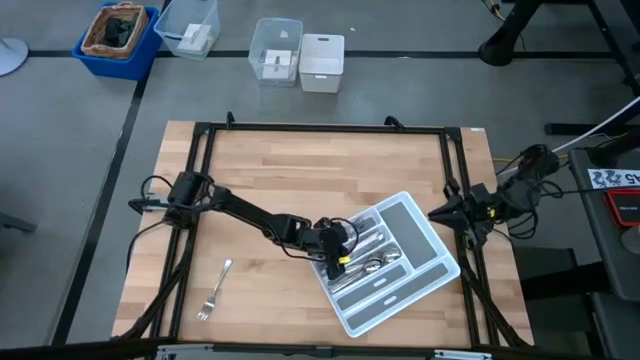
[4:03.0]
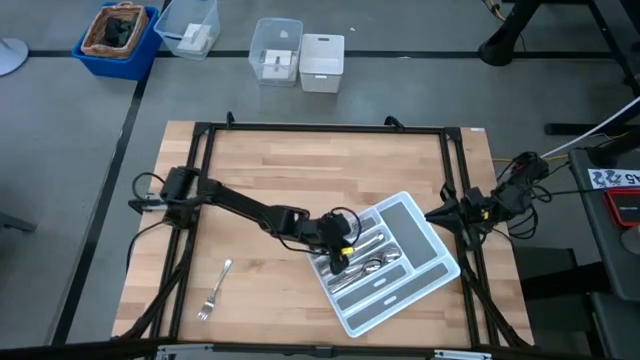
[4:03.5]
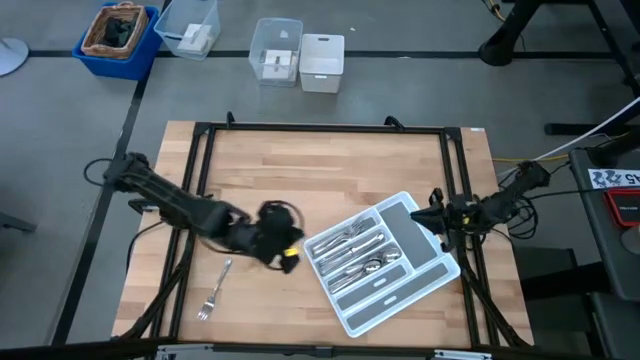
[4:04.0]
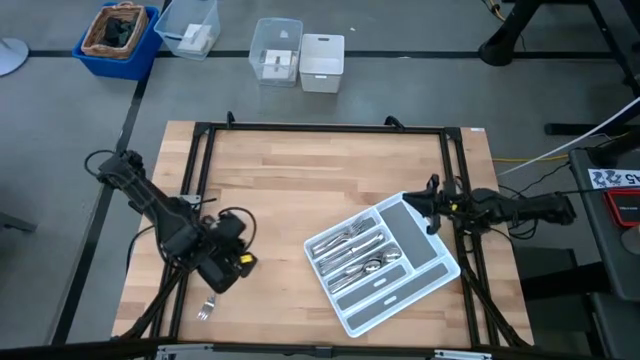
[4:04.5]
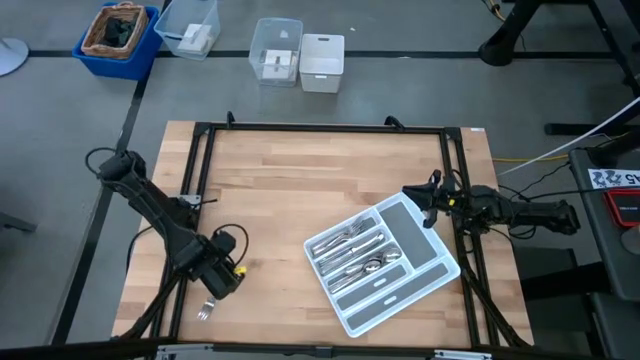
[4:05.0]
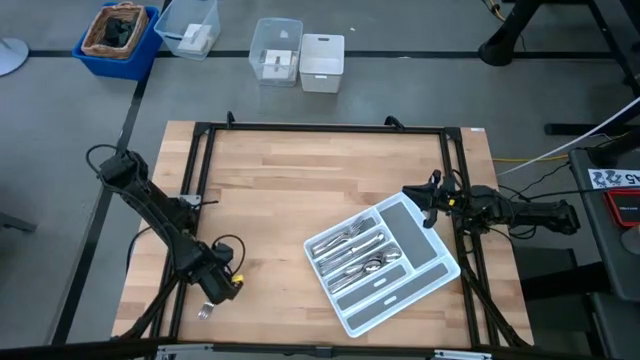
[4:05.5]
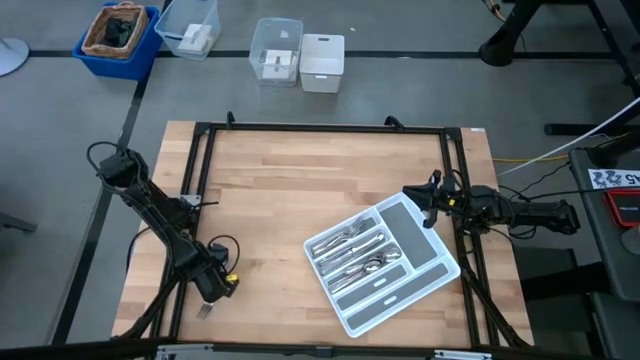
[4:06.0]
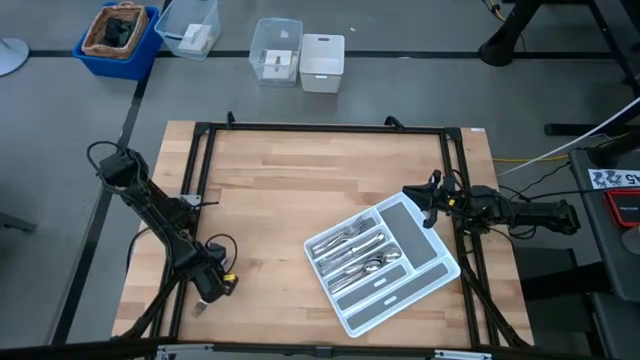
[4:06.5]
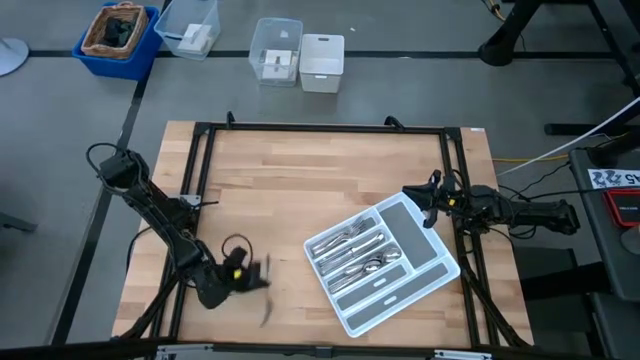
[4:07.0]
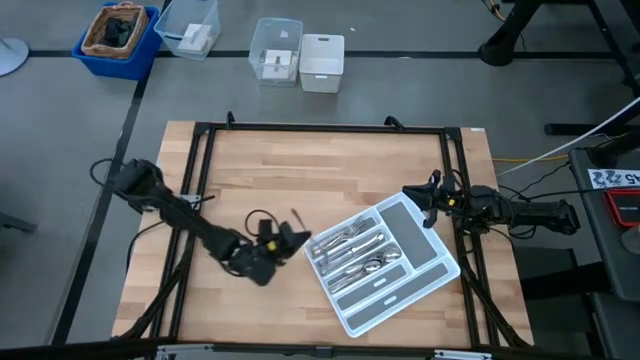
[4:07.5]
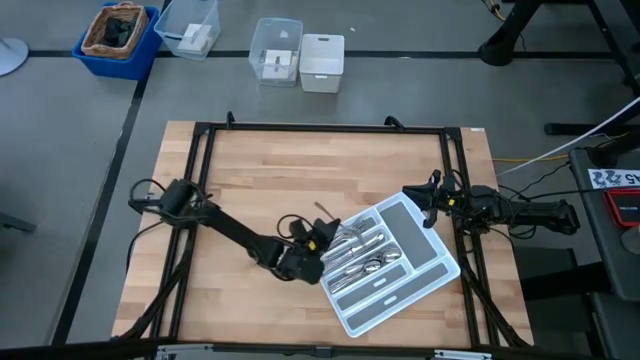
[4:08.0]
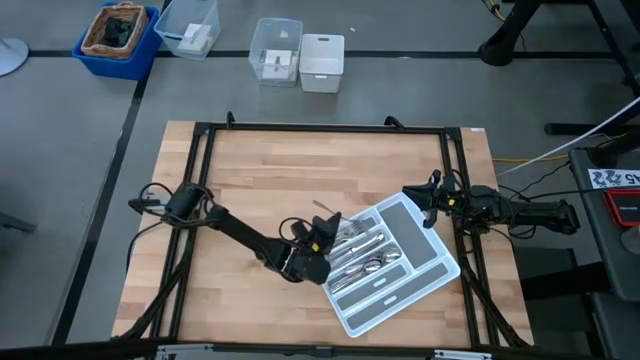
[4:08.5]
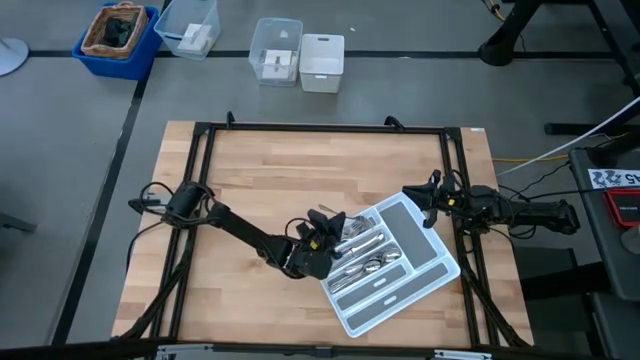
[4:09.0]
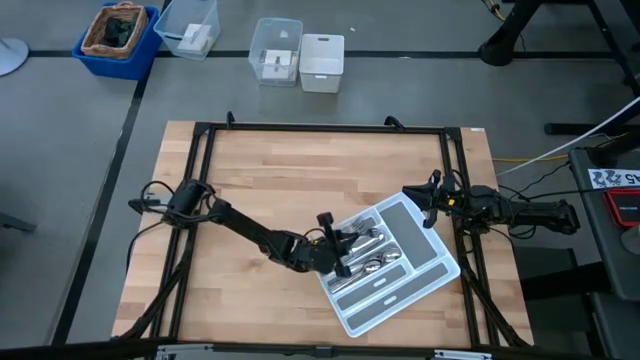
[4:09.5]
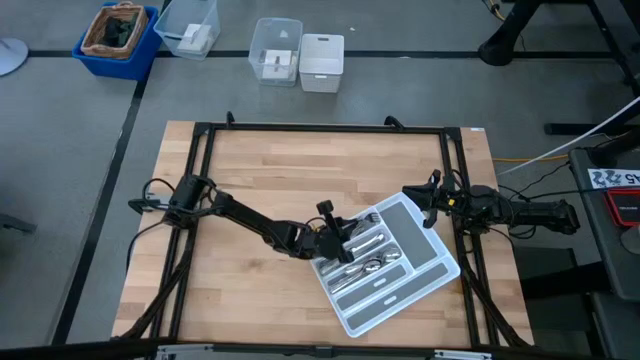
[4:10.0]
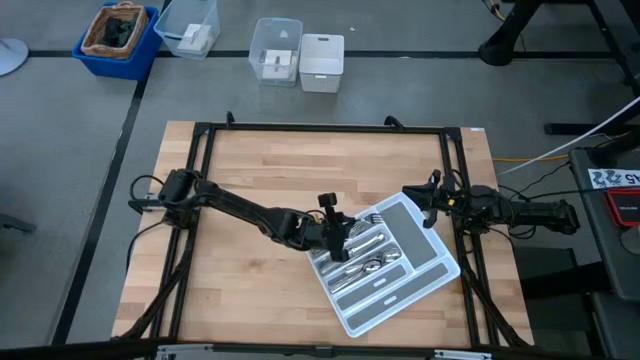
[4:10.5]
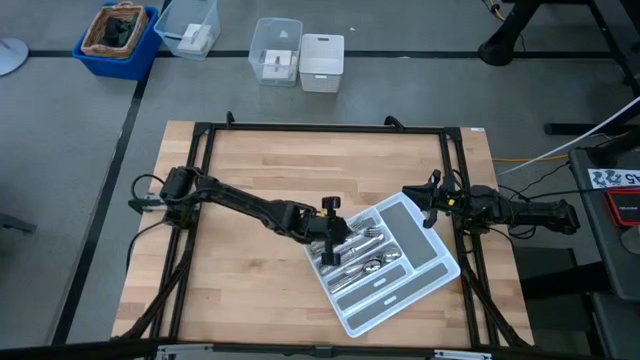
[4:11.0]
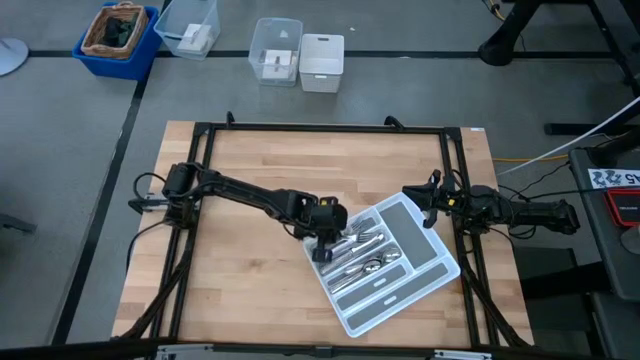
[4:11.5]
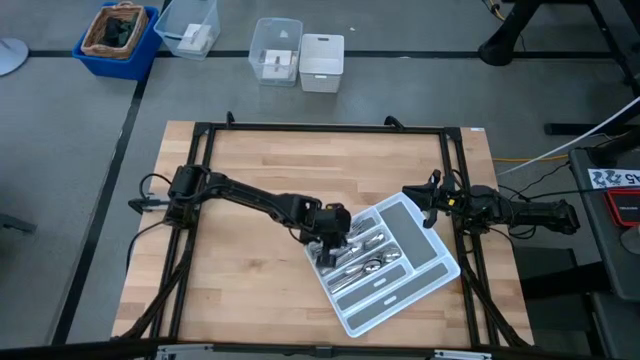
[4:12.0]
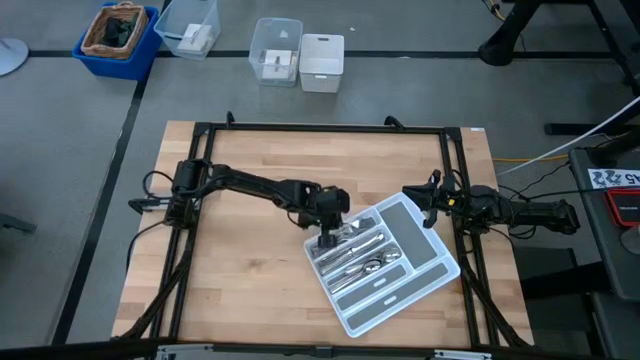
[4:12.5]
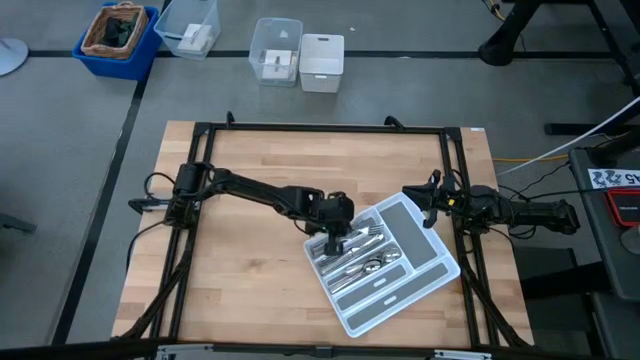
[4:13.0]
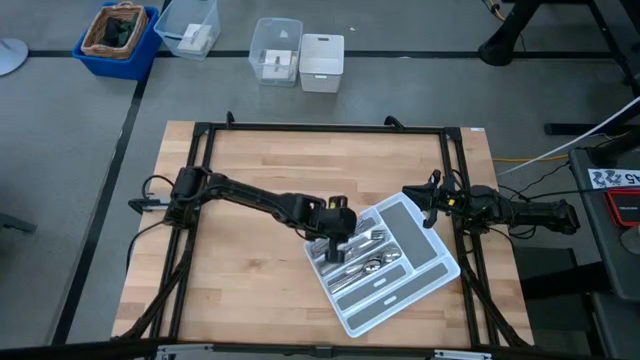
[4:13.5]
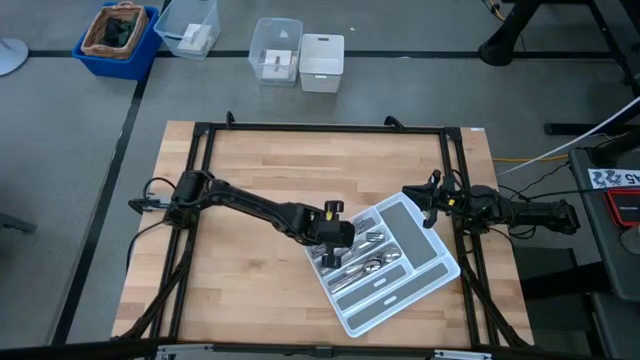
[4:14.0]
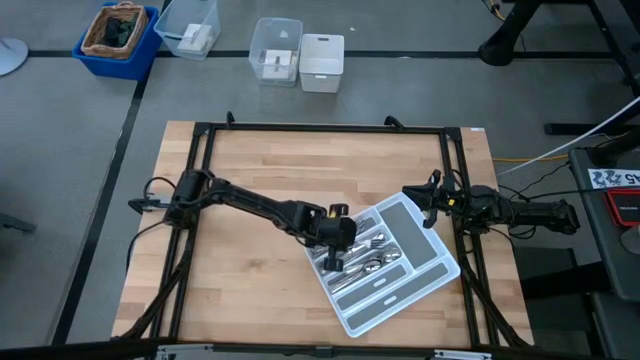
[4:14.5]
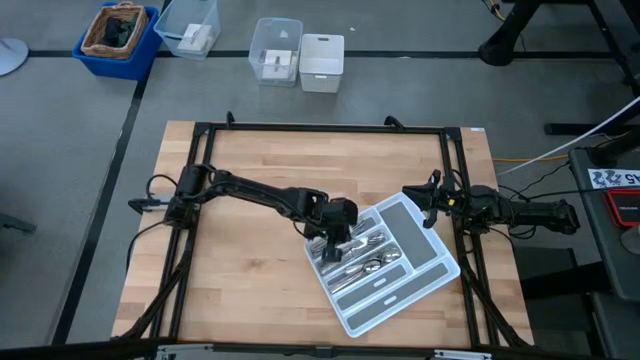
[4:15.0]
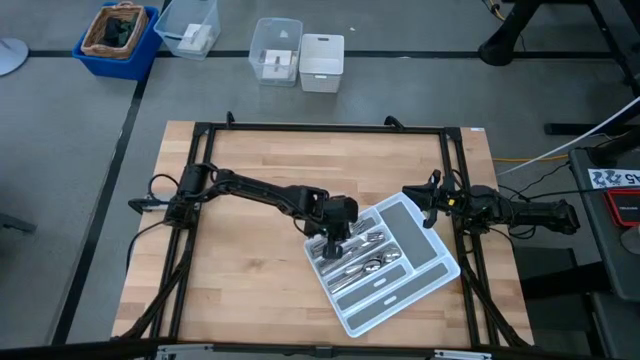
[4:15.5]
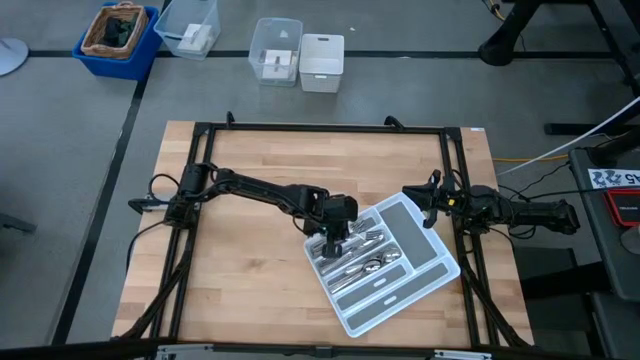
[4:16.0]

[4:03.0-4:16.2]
Task: Sort silverware
Put the silver fork into the silverware tray

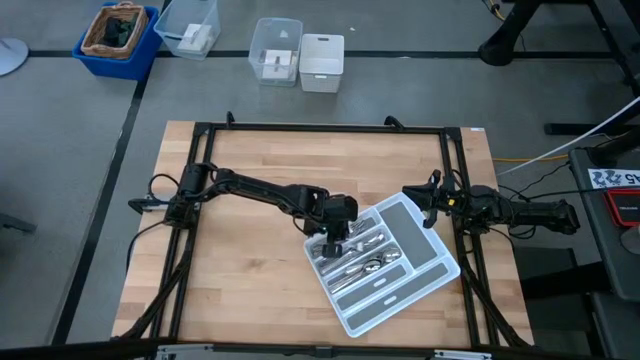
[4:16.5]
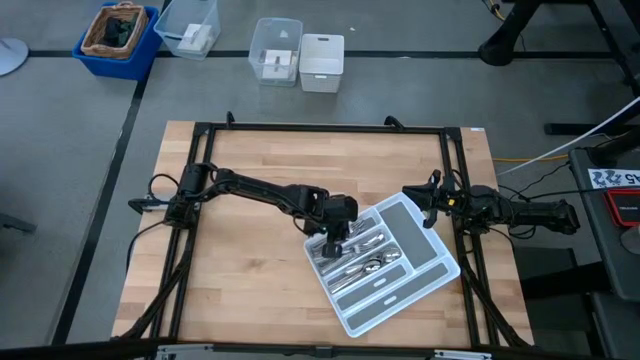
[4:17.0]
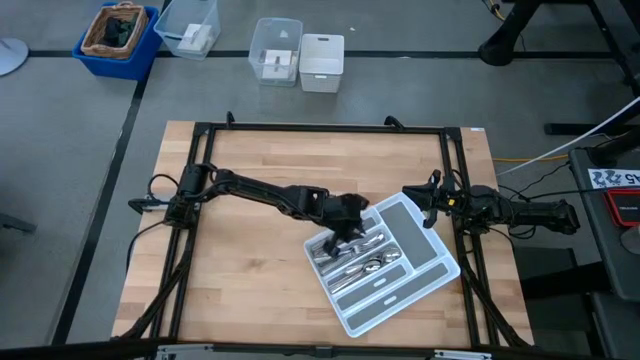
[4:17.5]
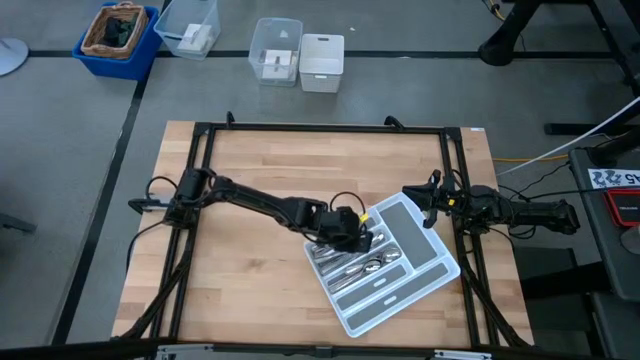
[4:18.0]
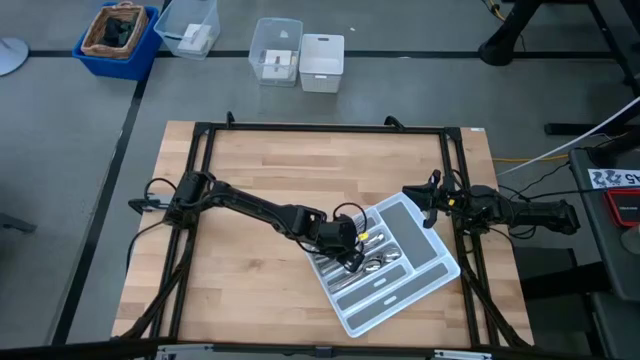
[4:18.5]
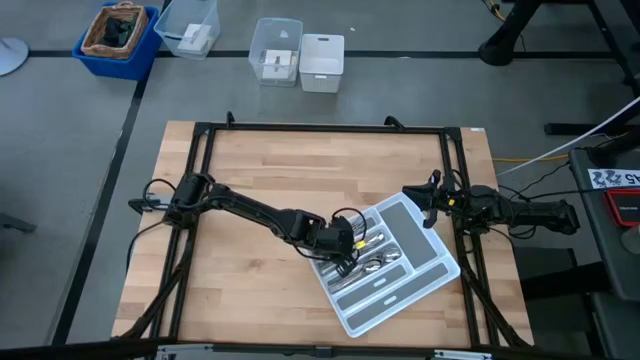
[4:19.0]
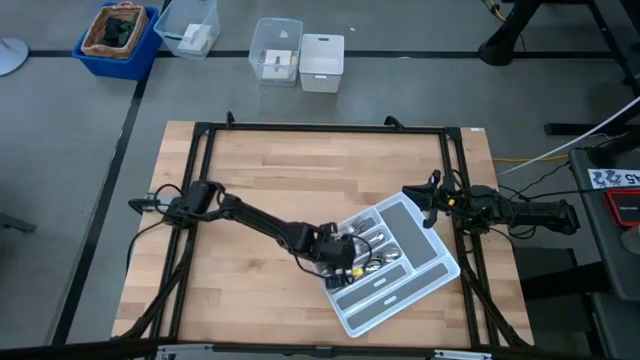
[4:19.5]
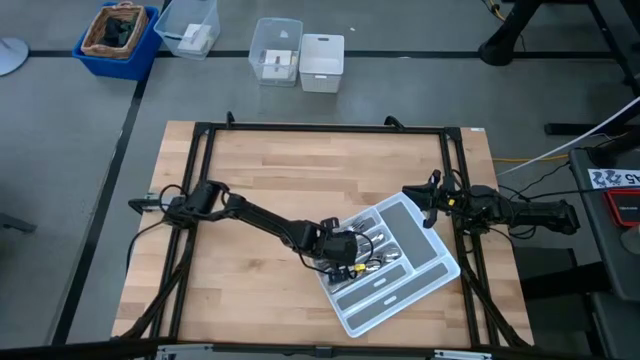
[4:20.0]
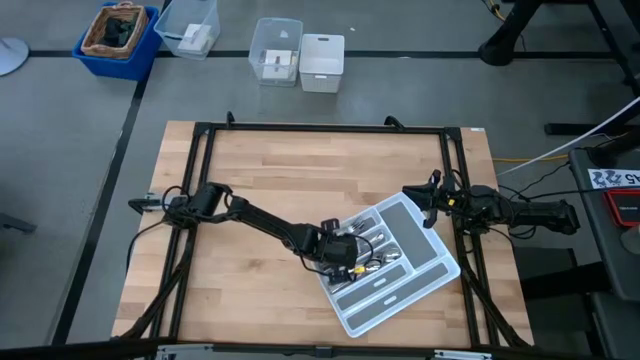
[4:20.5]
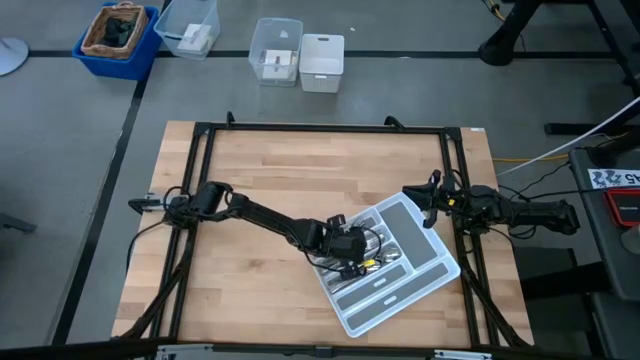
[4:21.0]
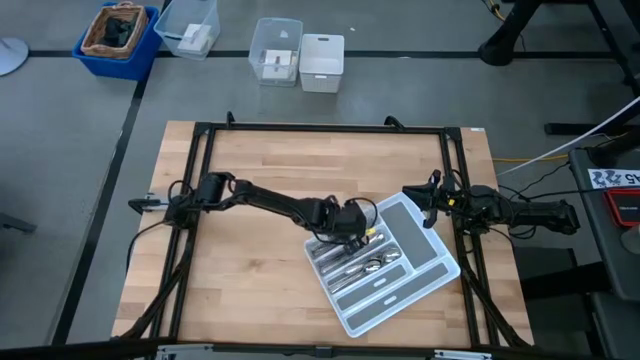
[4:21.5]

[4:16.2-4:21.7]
Put the silver fork into the silverware tray

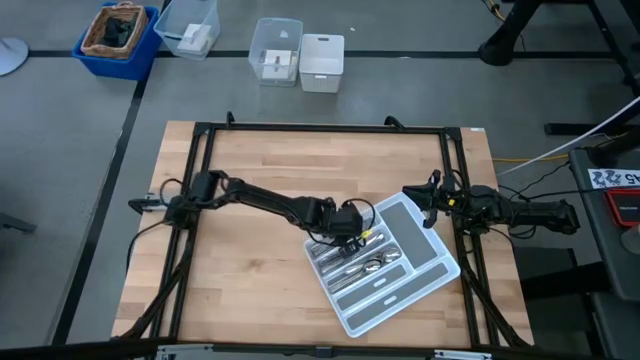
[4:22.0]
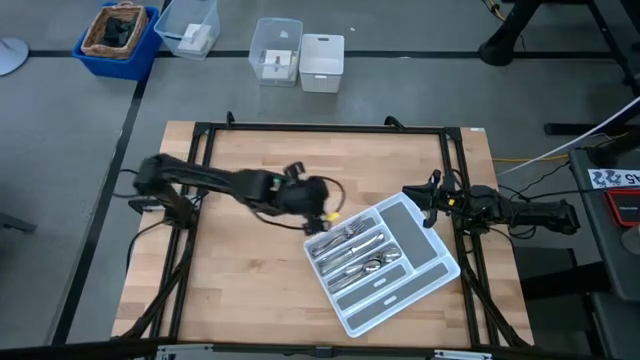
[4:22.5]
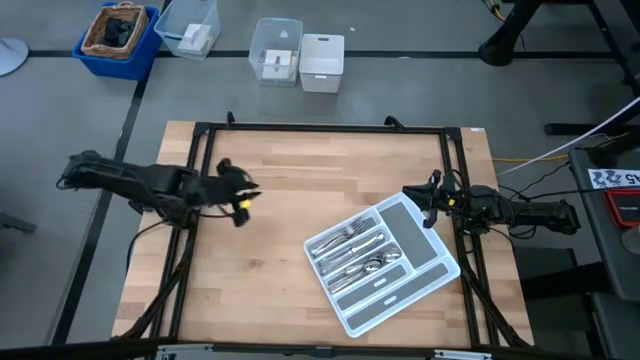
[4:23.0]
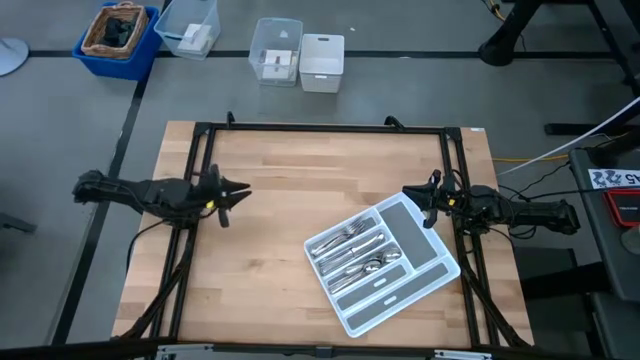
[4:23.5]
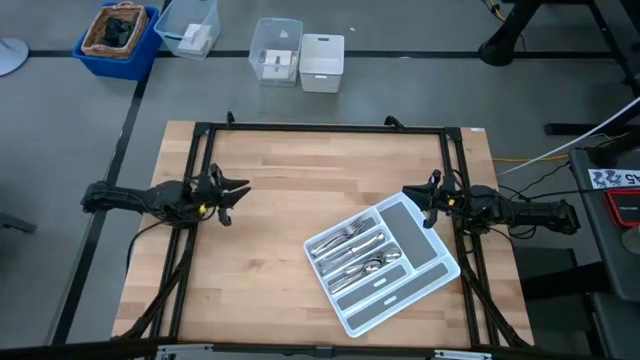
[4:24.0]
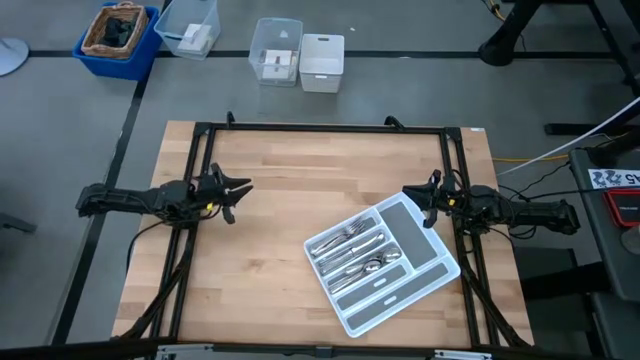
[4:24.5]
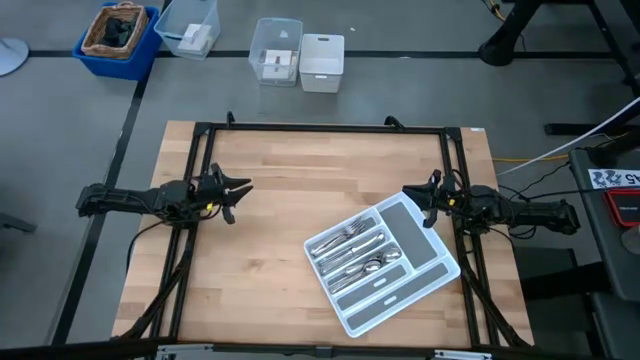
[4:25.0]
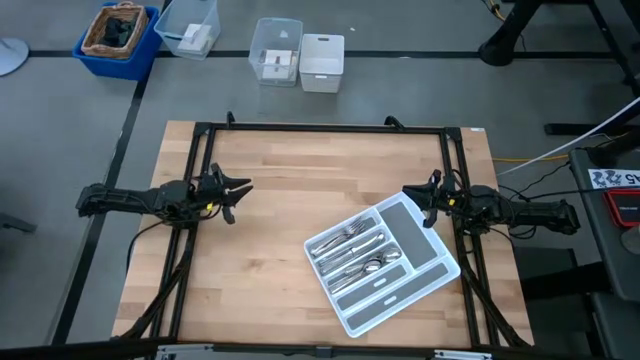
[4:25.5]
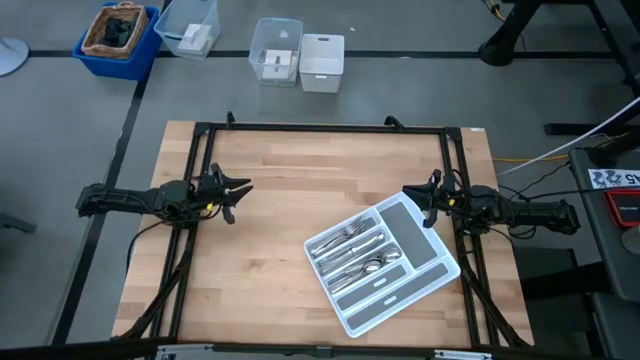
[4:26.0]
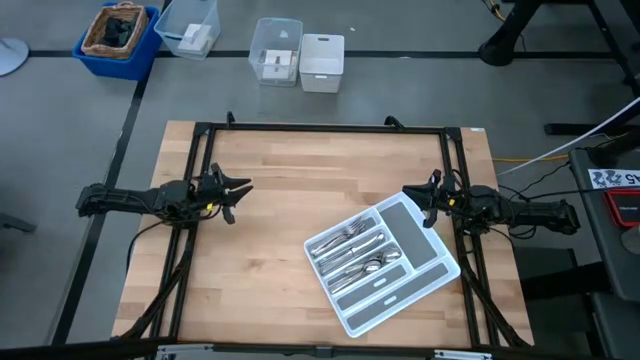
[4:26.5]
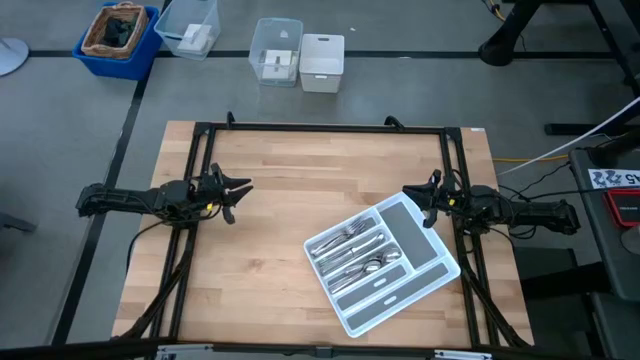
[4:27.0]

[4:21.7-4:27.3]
Return to Home Position
